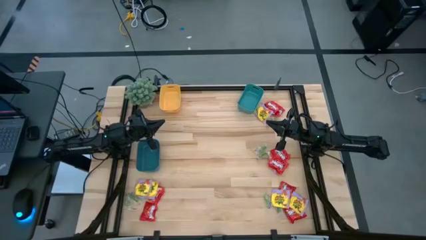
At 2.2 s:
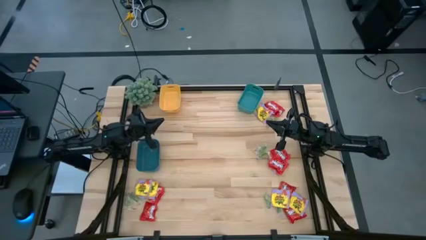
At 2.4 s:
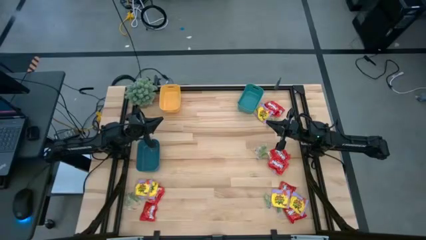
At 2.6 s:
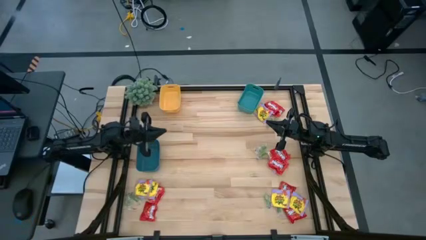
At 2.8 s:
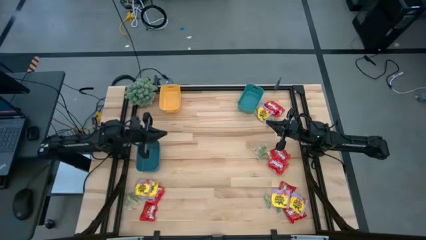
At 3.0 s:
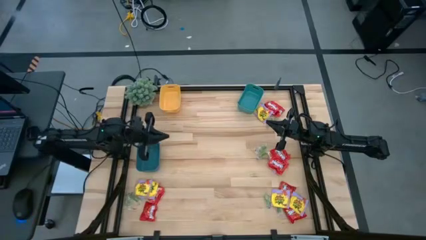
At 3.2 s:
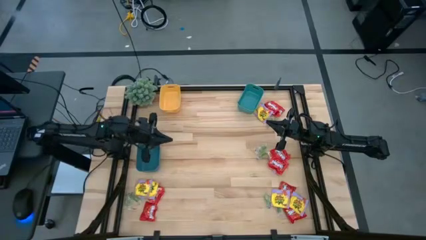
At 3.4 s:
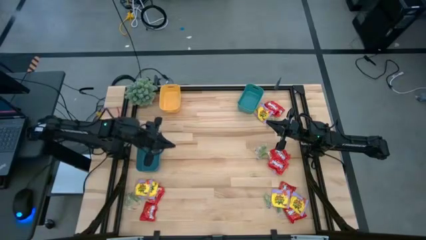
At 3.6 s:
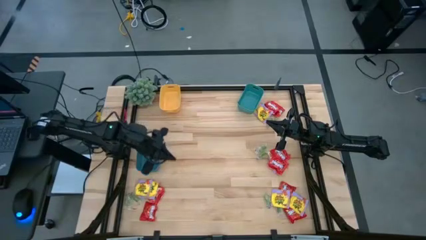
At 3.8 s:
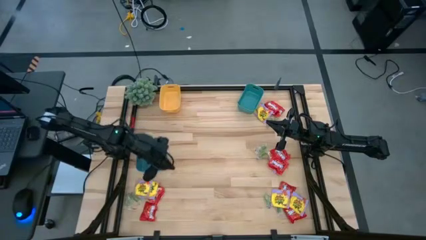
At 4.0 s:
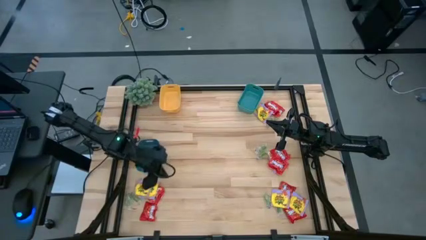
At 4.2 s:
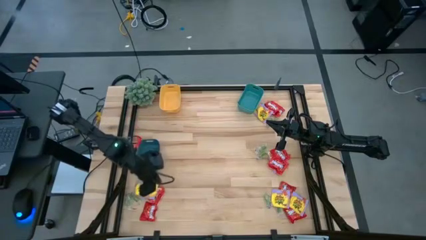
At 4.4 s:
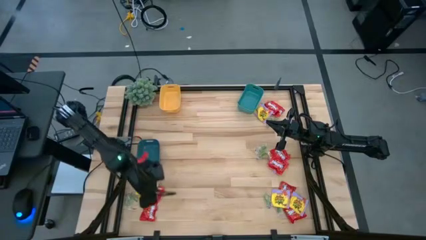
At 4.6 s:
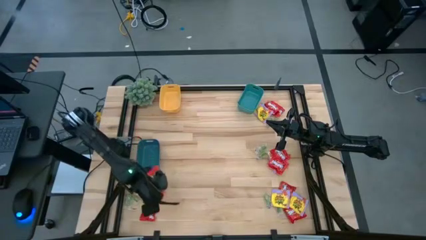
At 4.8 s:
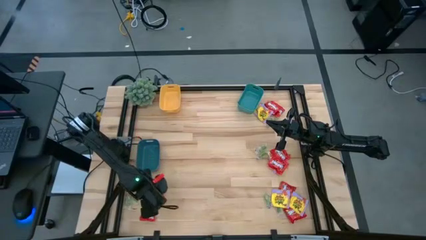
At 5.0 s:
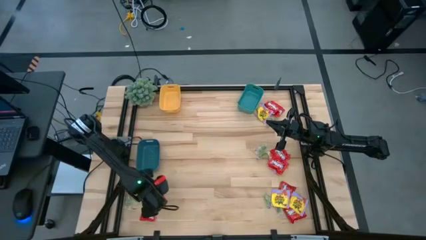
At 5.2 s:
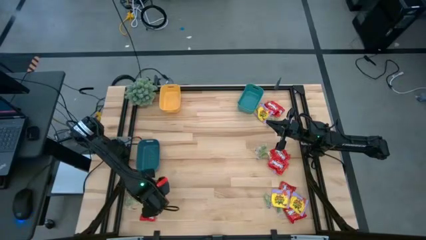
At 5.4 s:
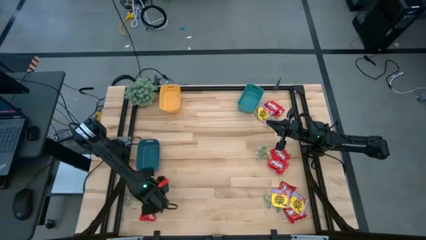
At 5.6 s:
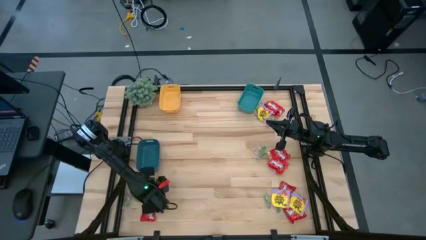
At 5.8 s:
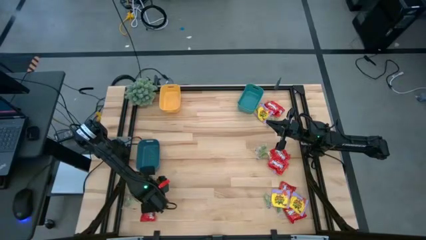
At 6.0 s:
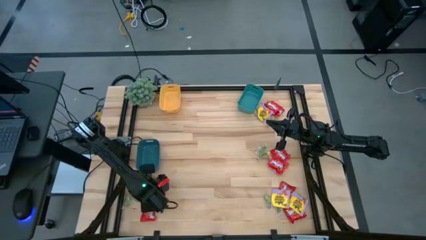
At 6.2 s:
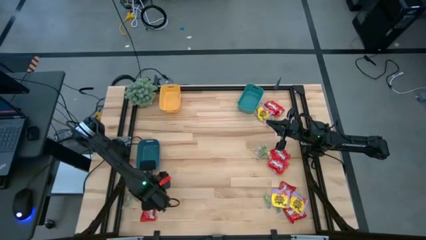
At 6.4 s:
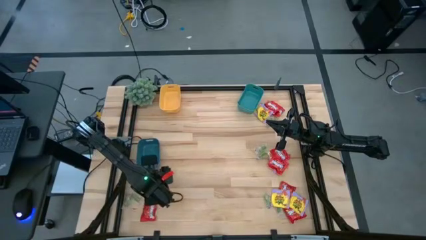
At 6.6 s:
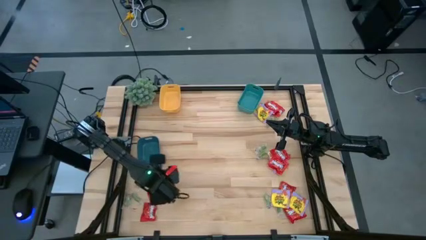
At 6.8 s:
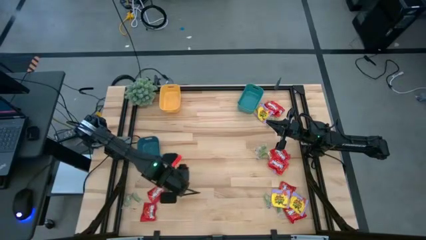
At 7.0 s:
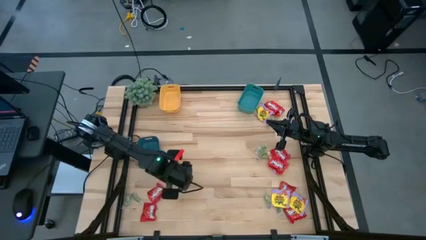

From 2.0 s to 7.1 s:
Task: Sort candy
Put the yellow candy pack into the blue bin

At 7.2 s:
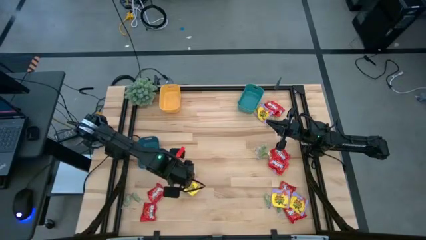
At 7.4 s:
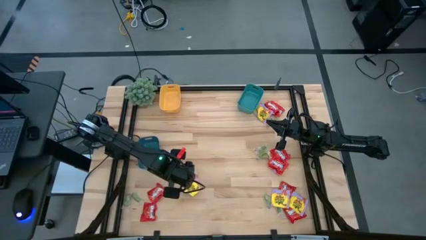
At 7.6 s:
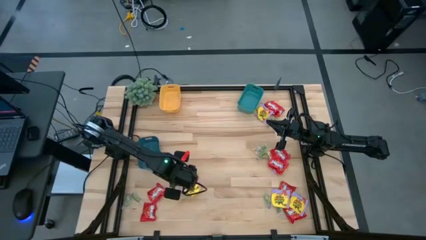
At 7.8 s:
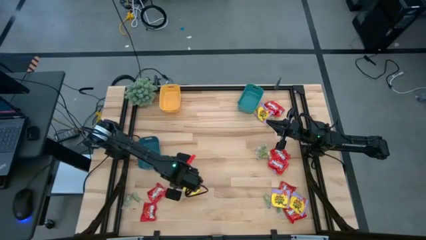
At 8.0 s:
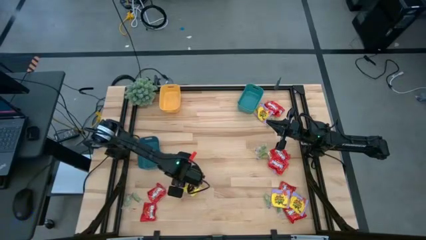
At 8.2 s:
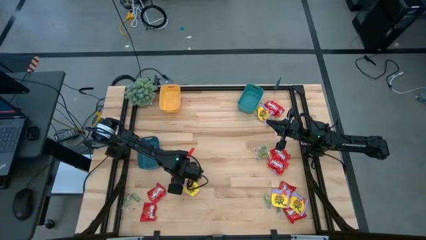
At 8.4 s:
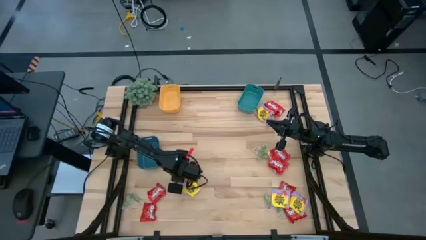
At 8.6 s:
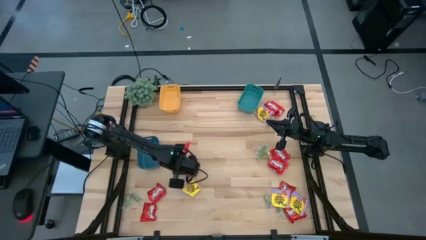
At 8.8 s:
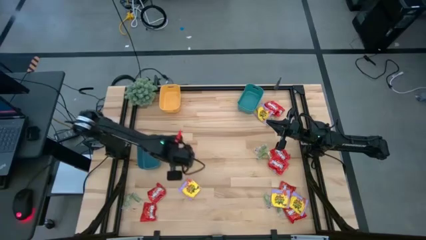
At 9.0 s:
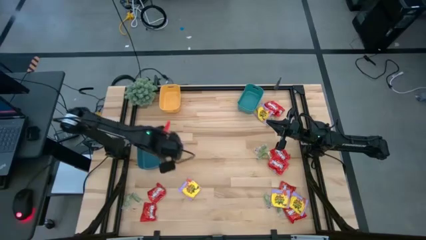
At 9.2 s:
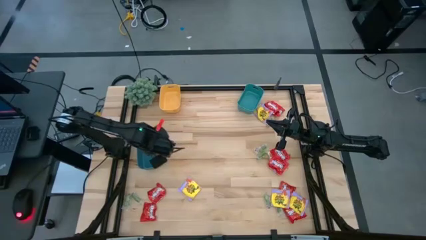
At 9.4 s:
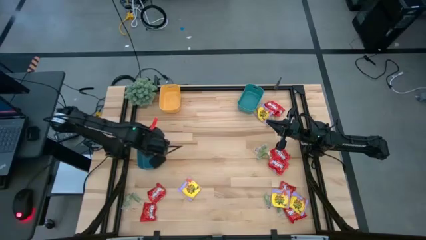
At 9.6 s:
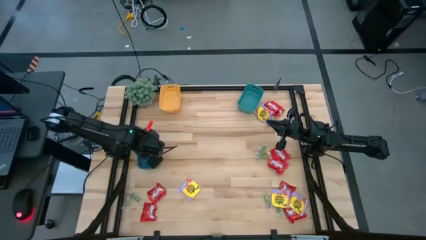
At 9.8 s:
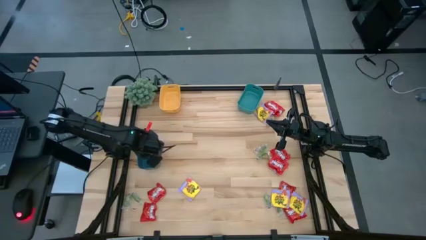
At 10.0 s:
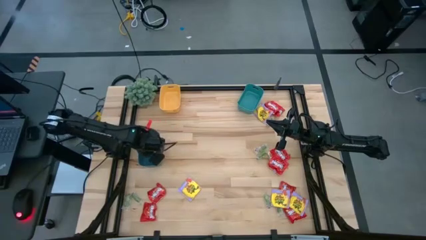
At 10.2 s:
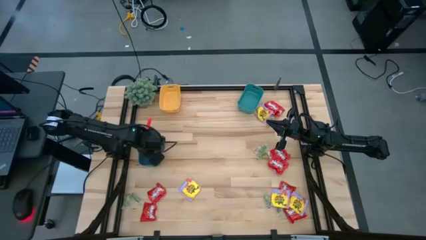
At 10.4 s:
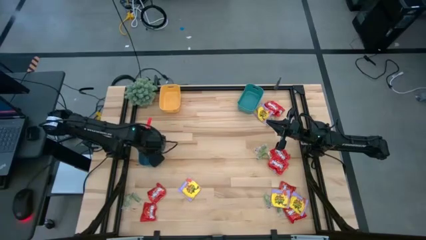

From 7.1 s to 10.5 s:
Put the yellow candy pack into the blue bin

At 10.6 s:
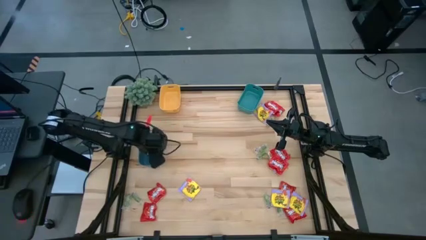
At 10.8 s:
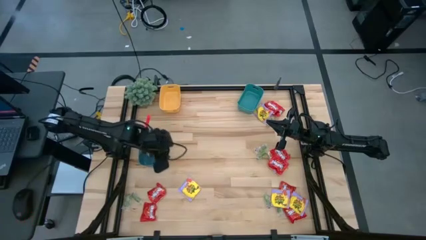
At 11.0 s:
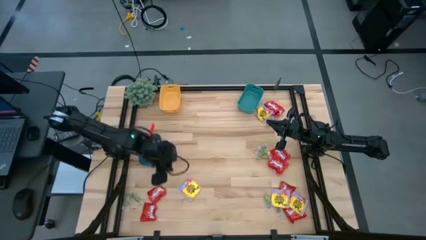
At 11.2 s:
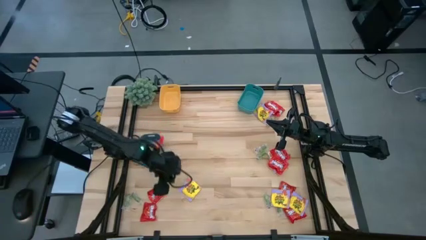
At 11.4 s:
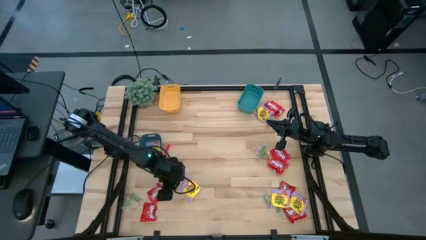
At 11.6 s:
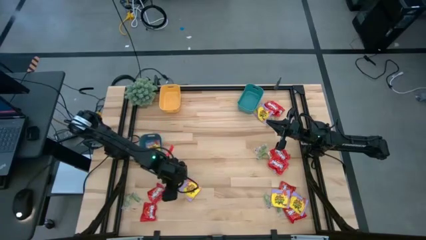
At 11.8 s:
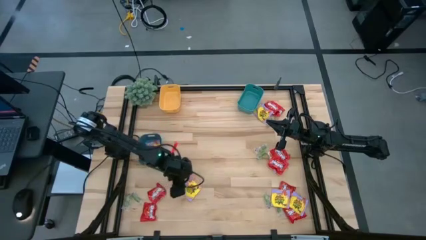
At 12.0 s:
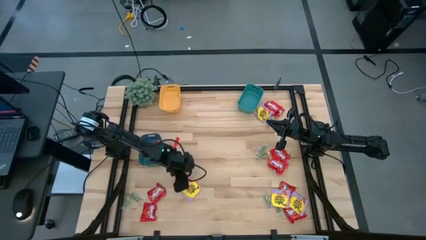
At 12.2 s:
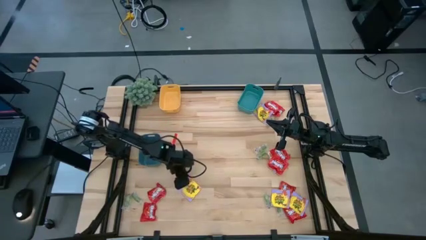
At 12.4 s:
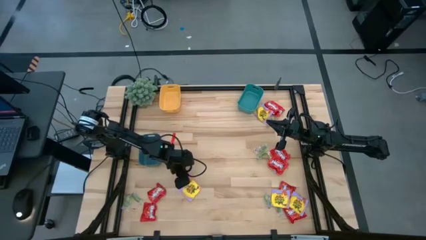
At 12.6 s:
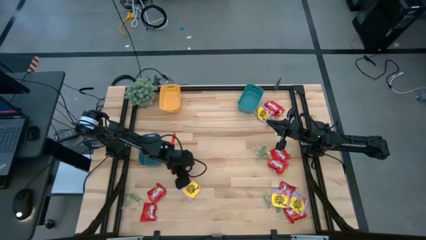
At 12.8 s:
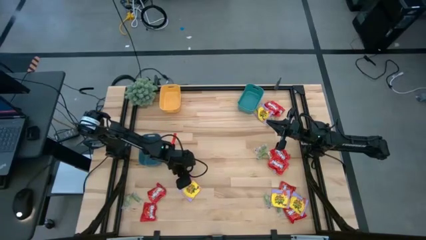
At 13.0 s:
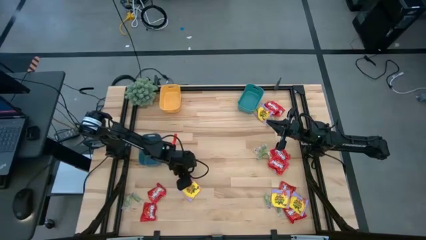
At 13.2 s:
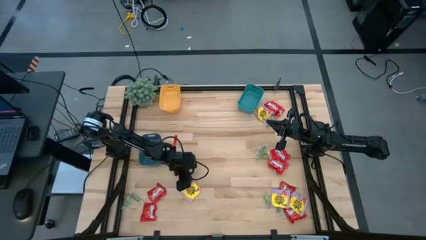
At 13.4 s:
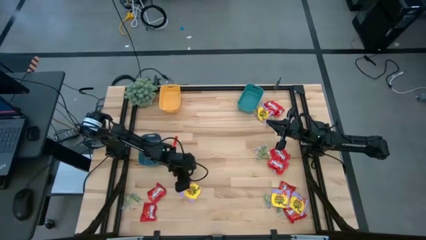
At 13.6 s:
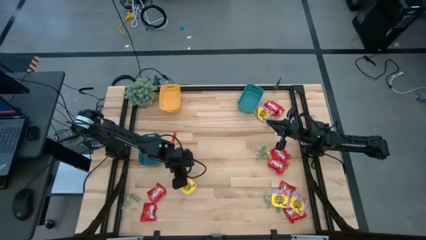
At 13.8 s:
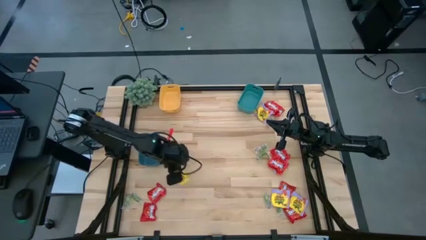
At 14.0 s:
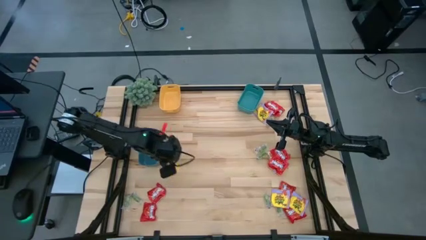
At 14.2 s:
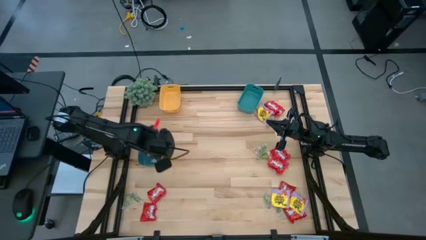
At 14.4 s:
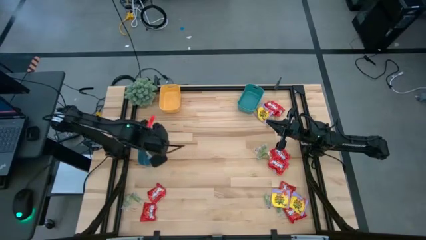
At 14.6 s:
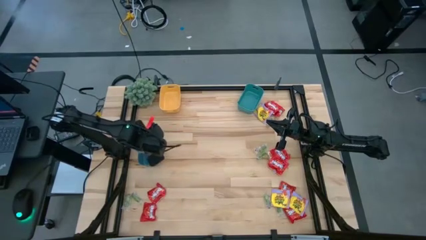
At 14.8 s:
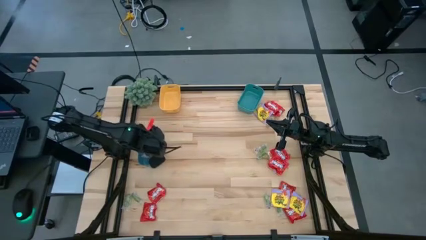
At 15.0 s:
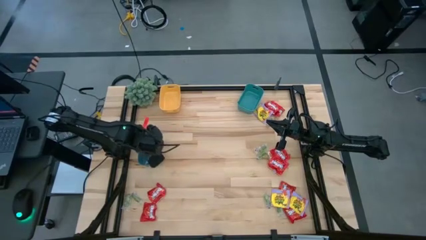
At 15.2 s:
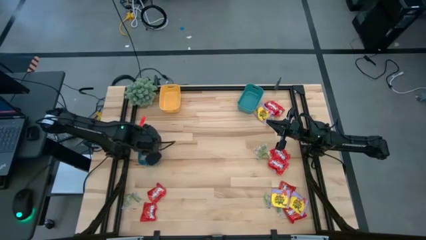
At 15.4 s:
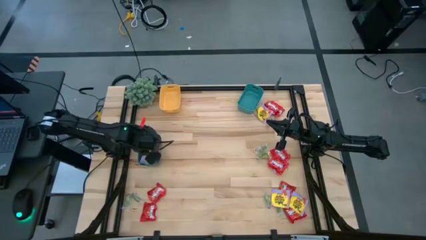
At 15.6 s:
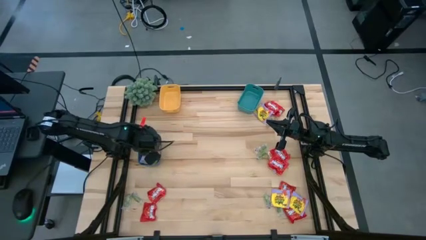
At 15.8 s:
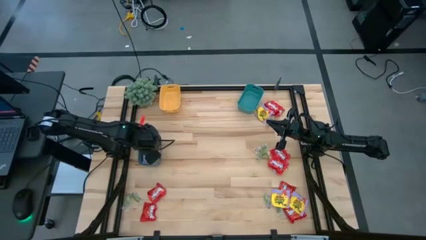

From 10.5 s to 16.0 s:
Put the yellow candy pack into the blue bin

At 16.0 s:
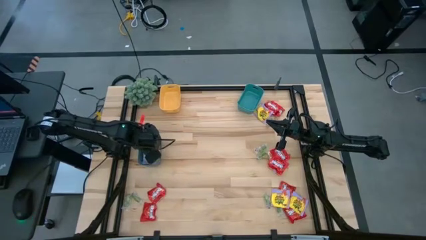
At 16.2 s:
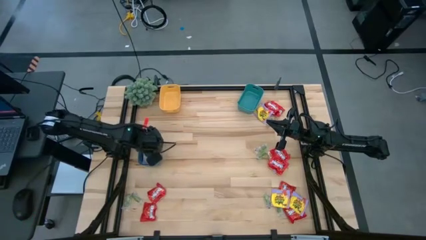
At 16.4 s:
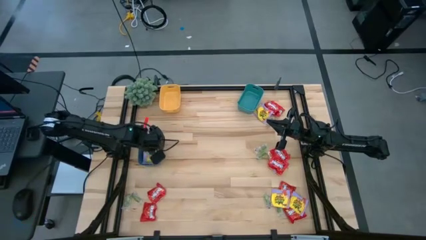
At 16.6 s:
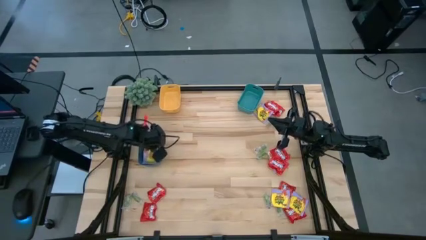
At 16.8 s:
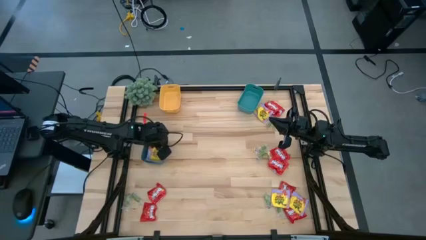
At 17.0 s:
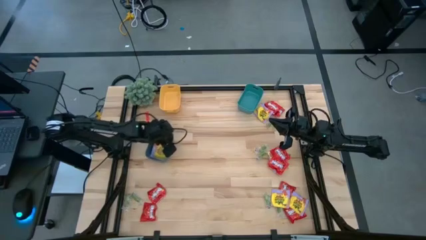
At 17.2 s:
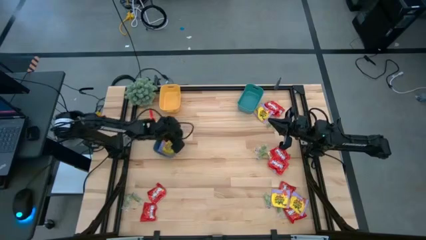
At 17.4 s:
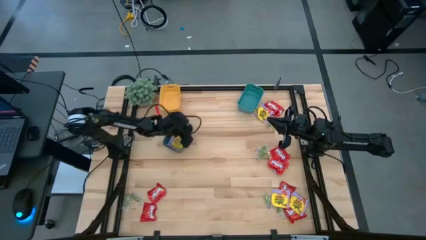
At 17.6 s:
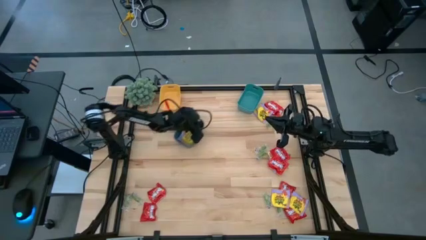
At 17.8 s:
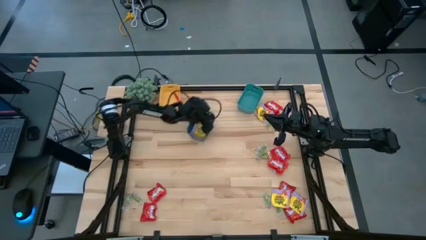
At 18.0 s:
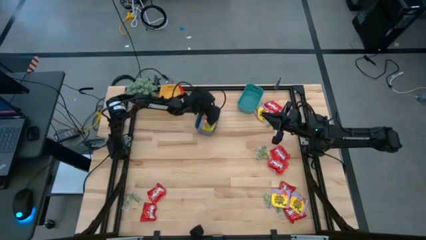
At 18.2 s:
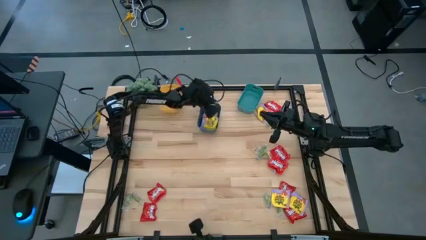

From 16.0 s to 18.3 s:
Move the blue bin to the top of the table
